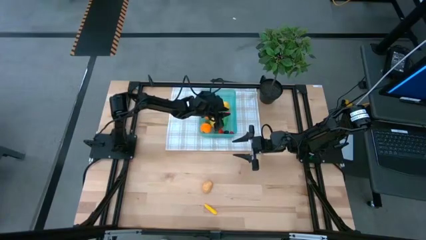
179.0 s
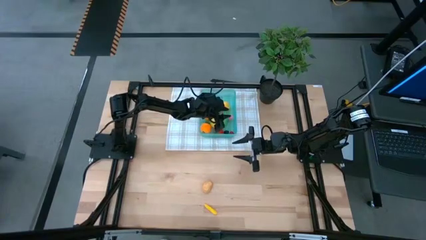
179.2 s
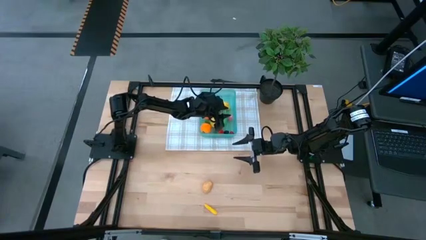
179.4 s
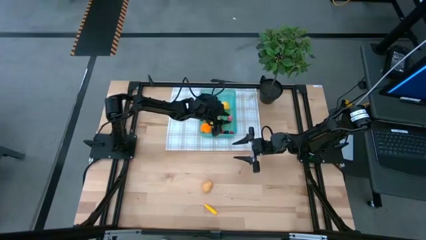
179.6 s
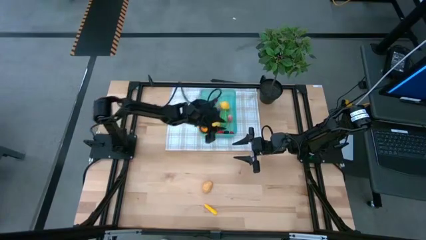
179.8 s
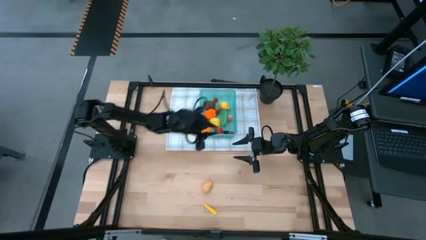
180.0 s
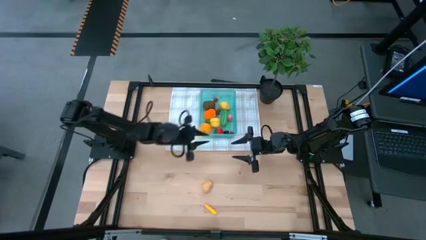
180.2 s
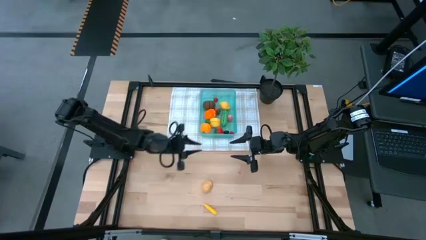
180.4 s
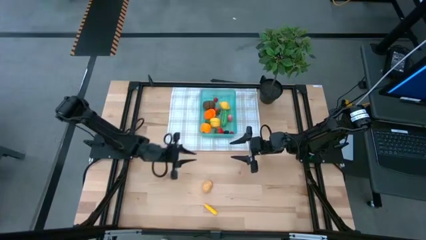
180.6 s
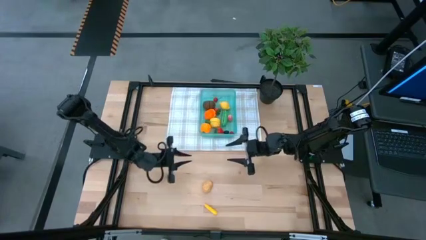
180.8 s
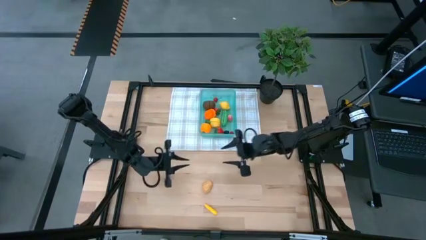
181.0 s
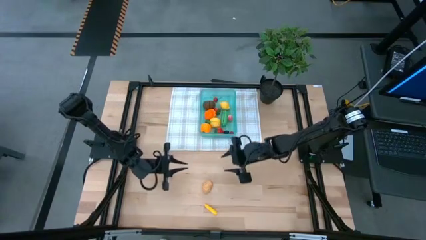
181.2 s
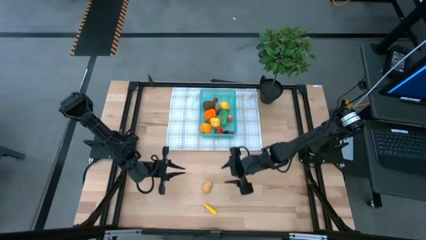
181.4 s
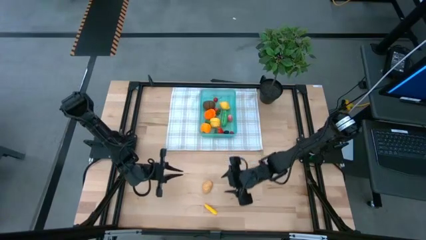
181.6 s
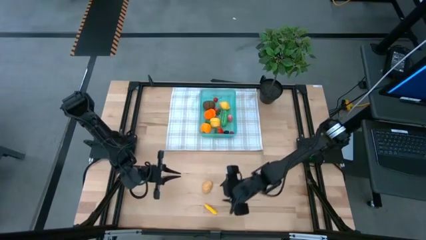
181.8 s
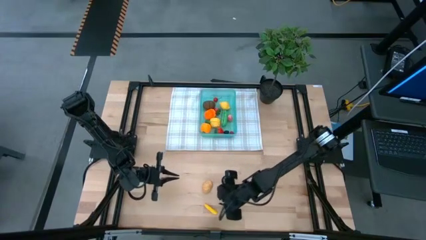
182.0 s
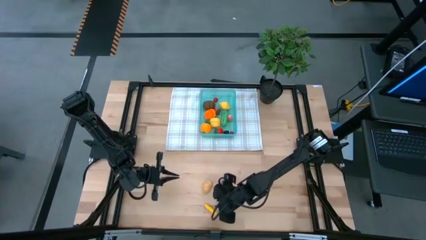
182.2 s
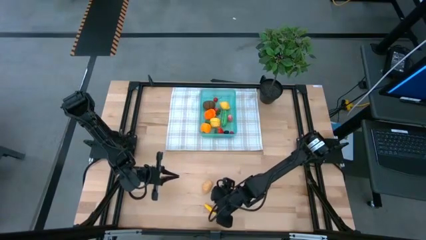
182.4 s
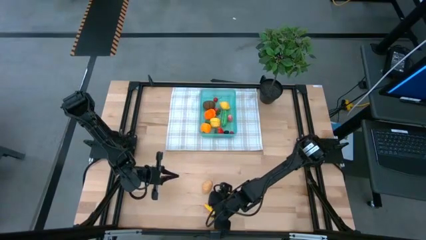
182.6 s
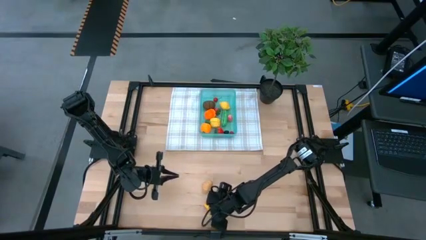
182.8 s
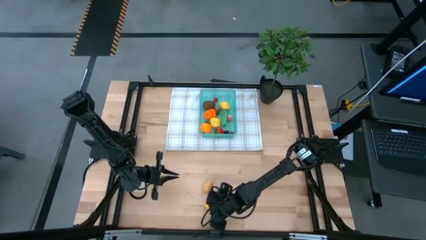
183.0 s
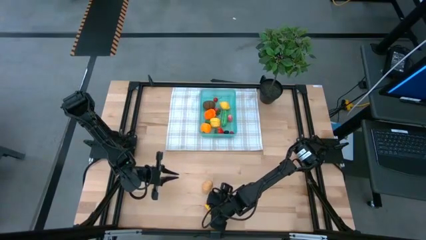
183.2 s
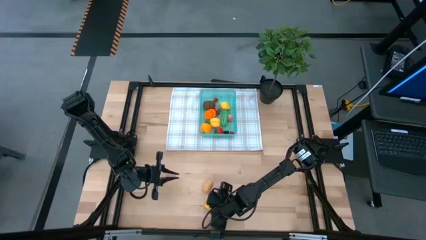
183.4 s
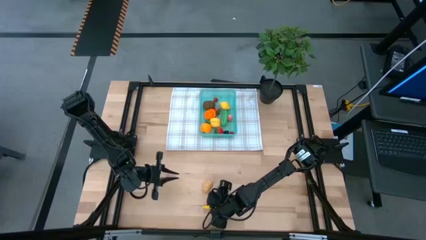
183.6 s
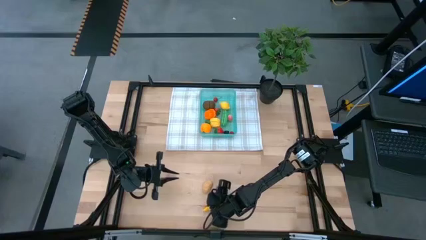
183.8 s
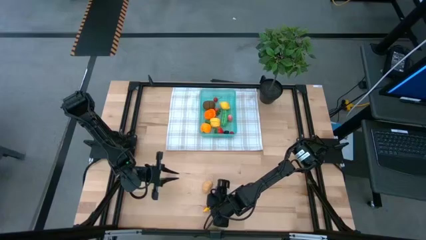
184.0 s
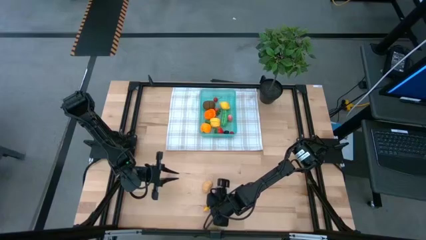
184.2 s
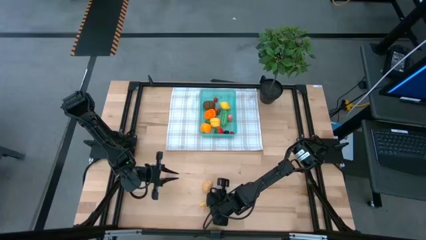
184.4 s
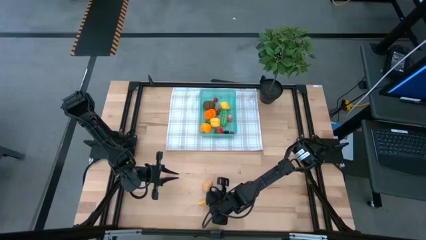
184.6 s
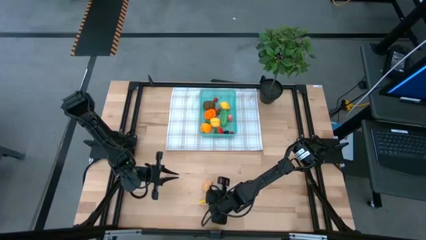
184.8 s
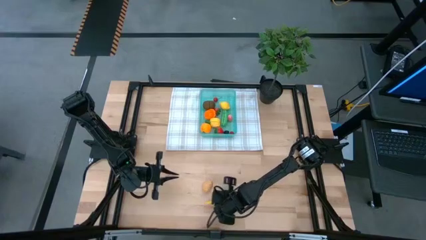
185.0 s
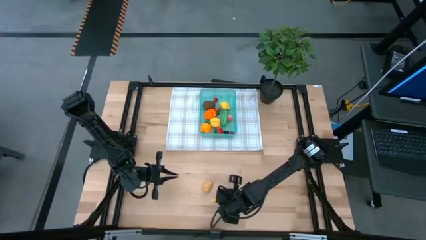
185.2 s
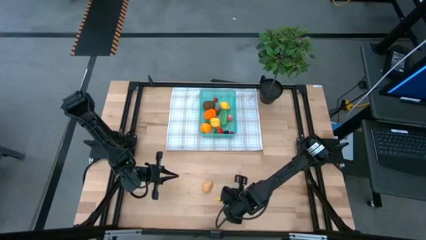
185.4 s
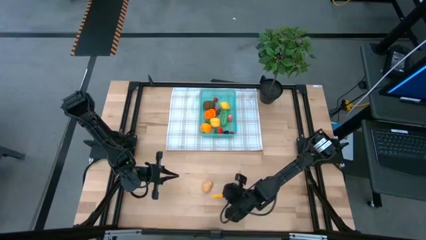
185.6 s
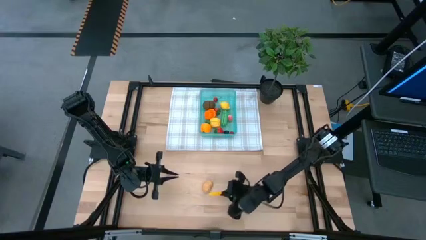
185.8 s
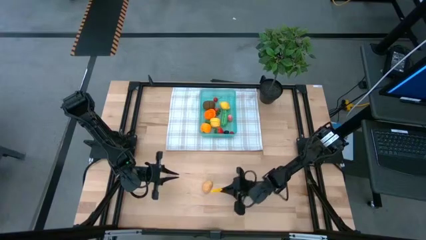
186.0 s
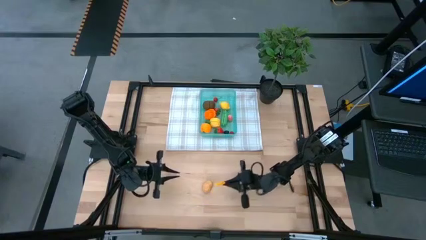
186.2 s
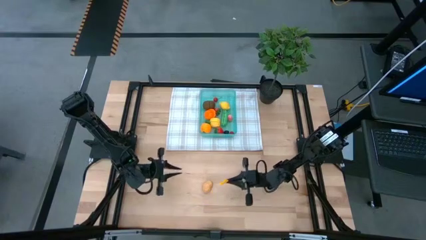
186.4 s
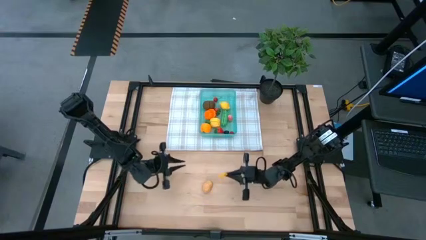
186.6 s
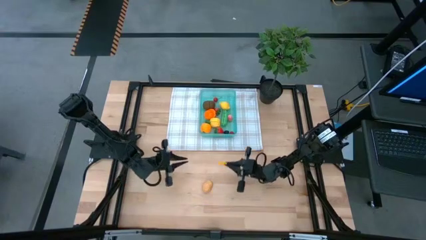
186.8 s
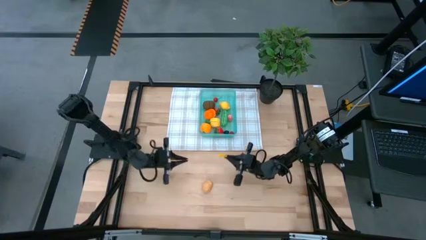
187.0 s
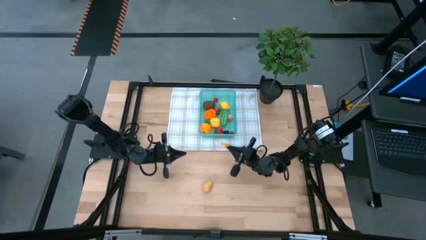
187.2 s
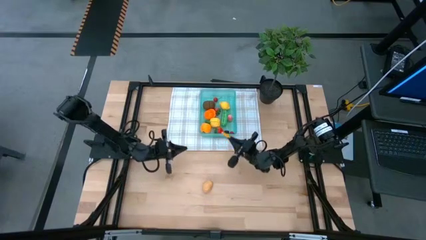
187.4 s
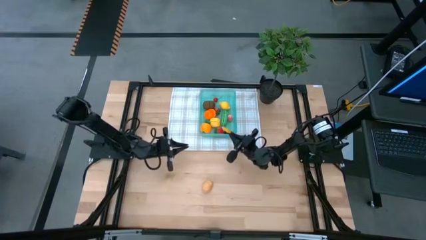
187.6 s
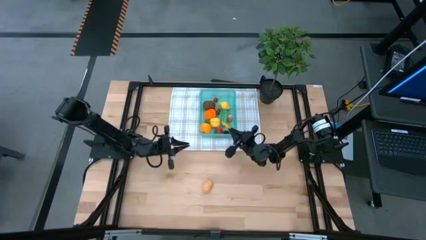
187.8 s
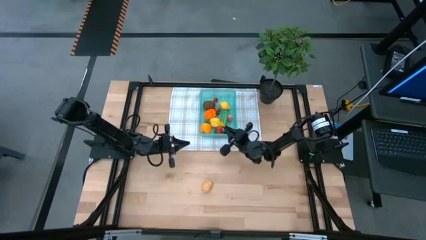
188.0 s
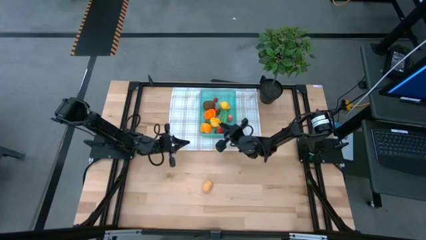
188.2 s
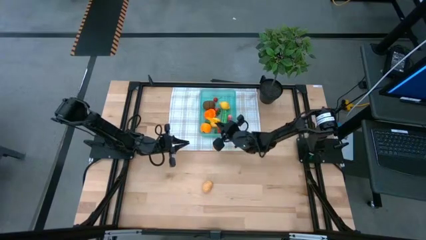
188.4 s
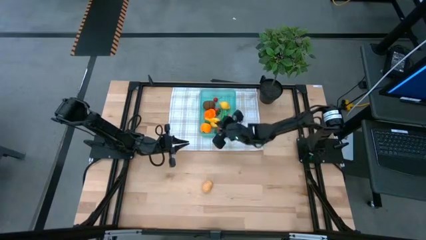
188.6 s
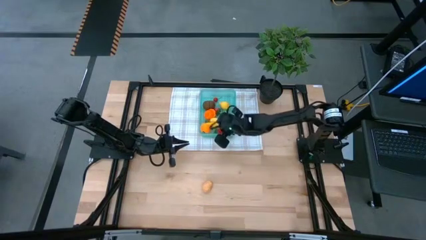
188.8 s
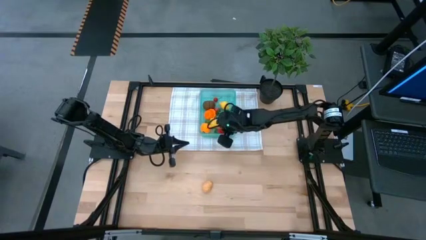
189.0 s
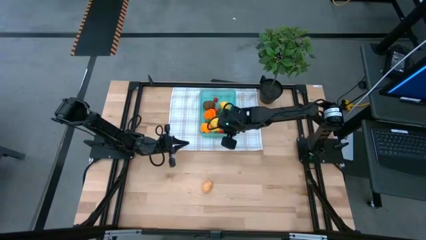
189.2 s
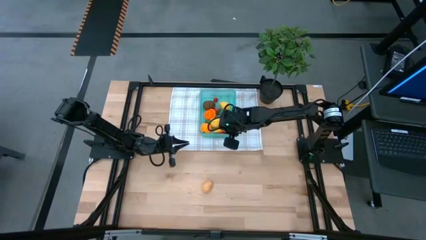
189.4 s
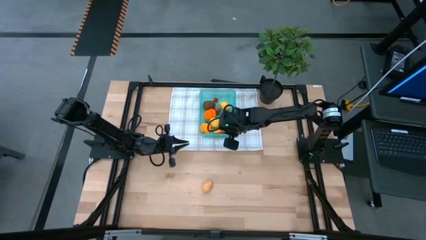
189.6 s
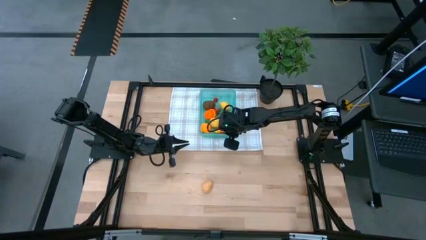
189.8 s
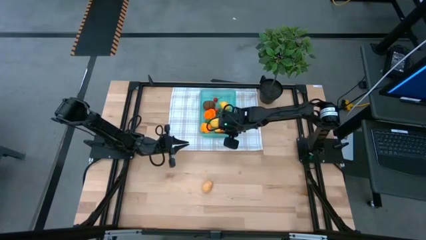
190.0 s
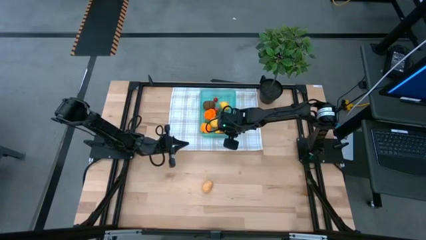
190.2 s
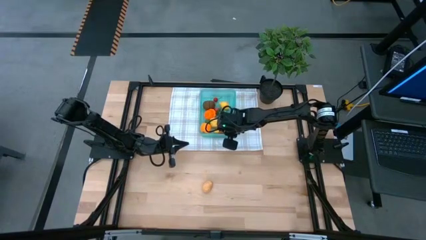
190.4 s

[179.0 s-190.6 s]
Task: Pick and placing Produce into tupperware
Put the yellow corn into the green bin

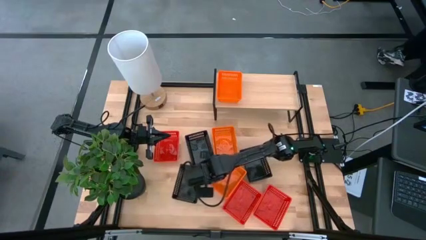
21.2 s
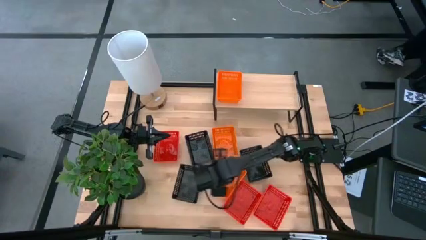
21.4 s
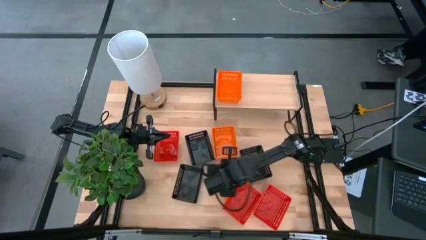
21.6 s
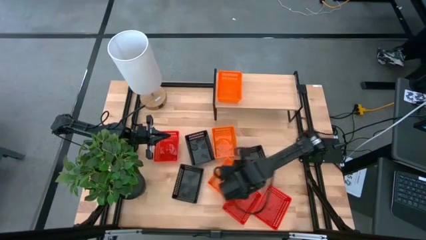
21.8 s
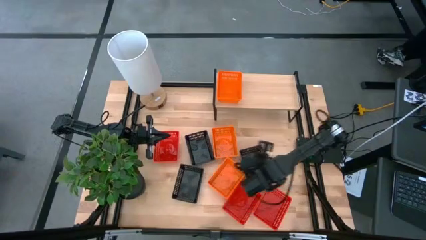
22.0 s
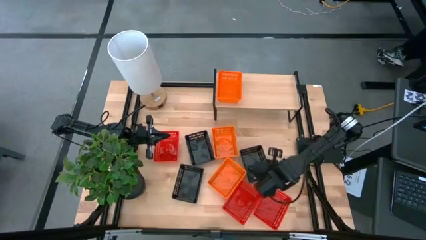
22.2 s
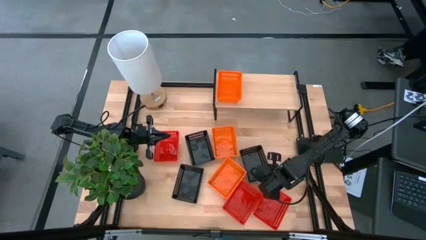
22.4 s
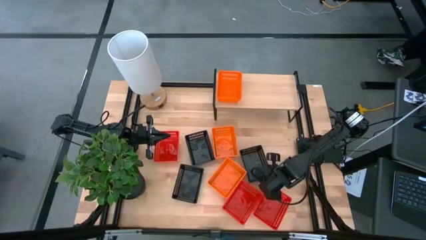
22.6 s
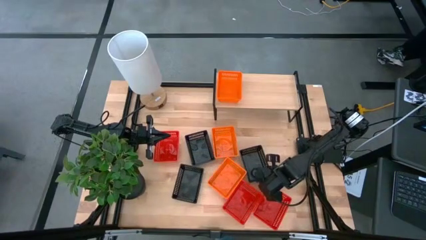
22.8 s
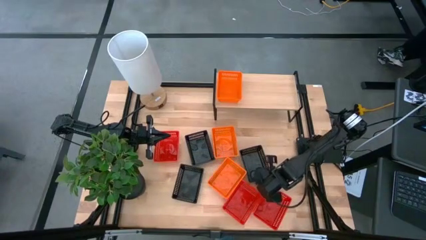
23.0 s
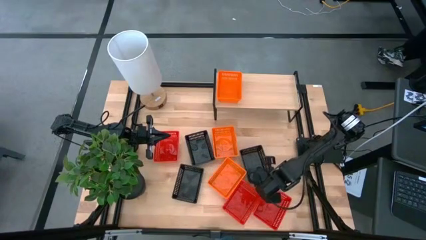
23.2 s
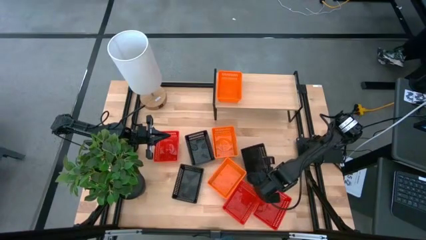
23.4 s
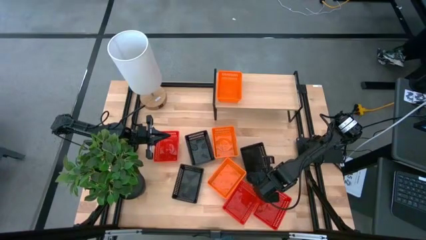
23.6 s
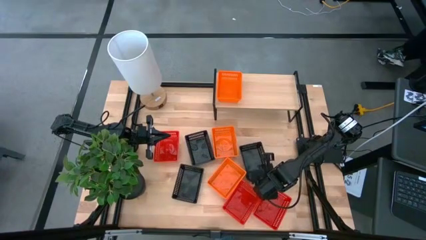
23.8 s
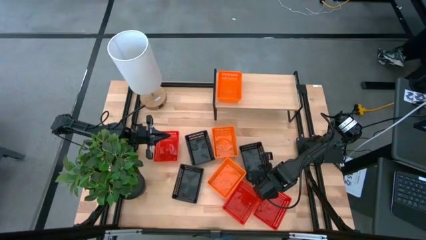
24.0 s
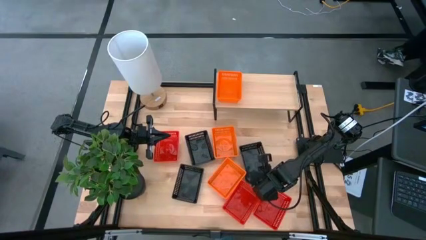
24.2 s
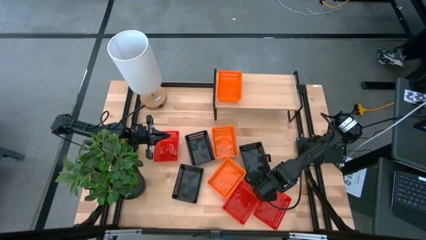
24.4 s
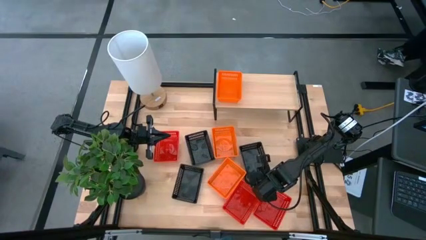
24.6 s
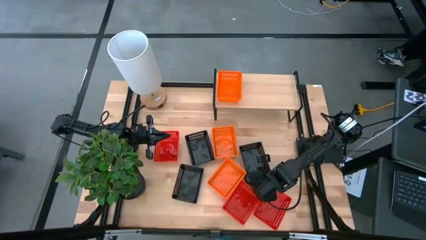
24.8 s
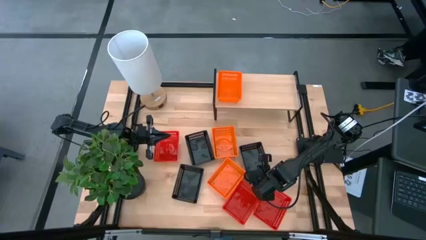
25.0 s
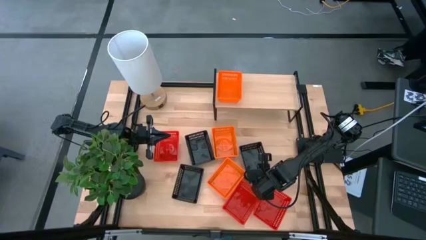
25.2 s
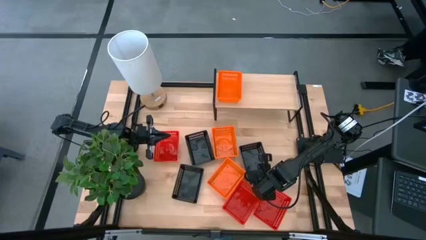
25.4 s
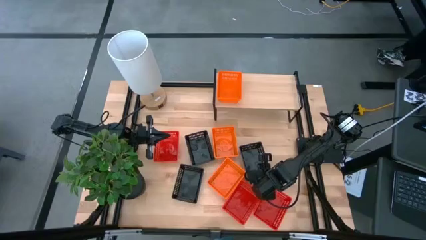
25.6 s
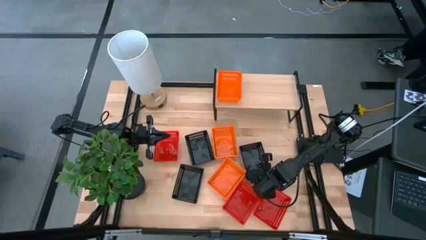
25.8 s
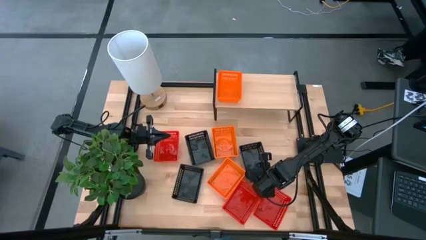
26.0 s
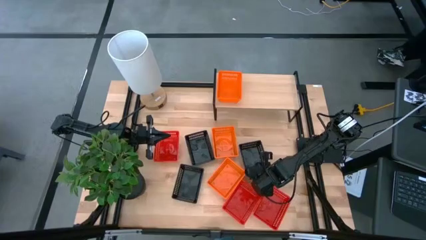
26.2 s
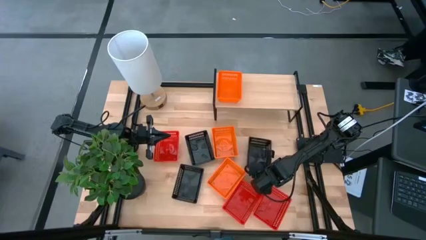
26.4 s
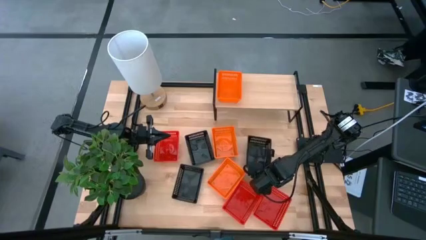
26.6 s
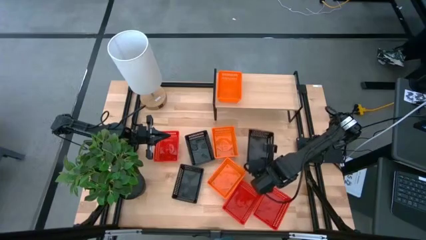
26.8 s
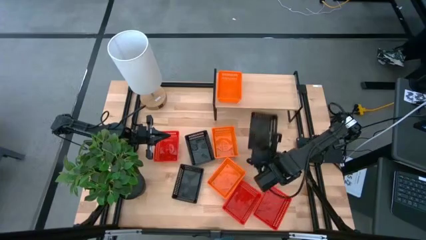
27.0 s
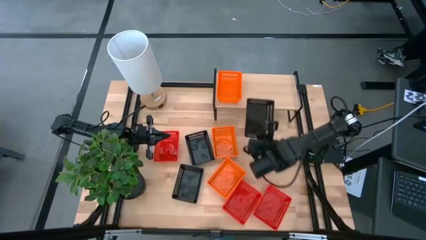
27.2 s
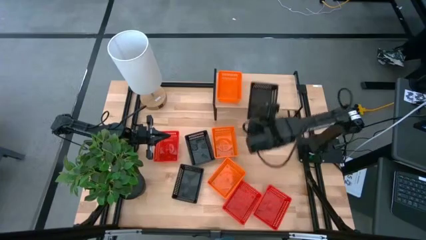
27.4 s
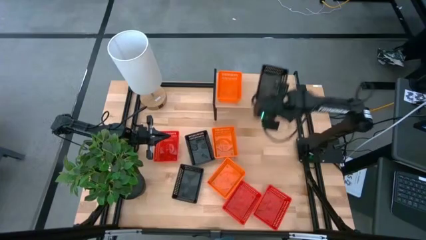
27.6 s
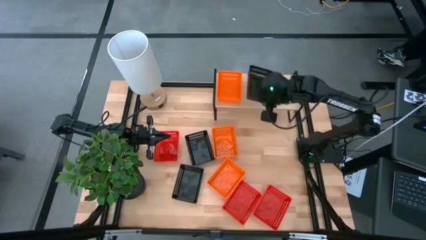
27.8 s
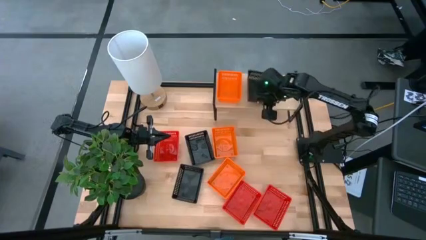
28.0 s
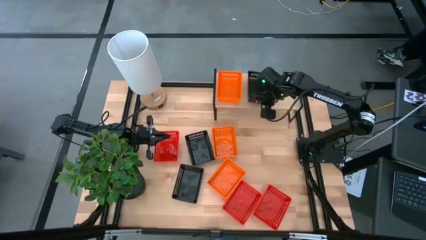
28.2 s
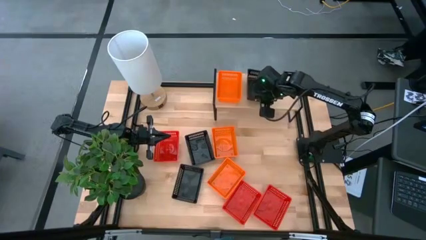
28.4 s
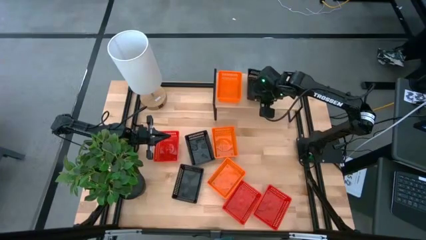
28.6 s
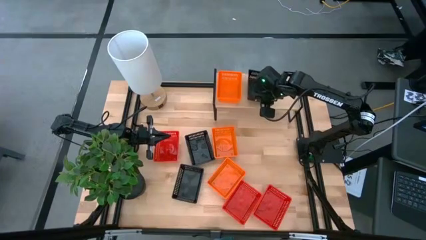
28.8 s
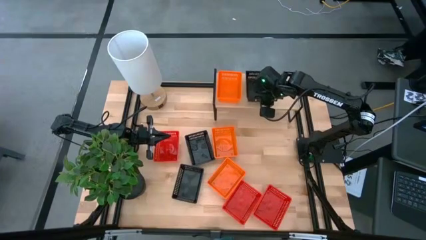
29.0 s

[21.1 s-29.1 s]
Task: Stack baskets on shelf by color
Put the top right black bin on the shelf
